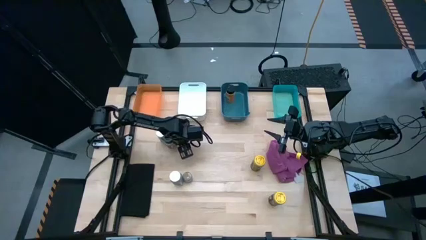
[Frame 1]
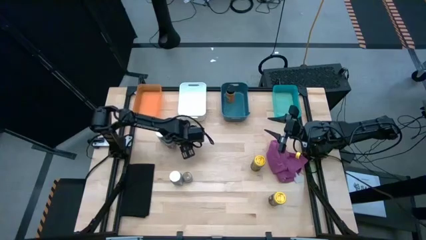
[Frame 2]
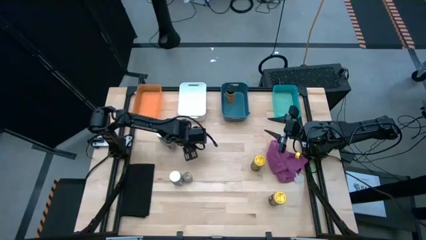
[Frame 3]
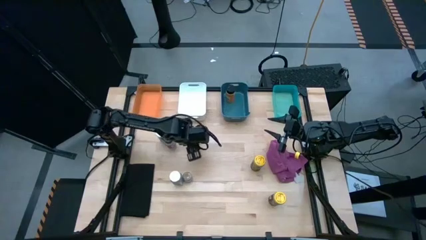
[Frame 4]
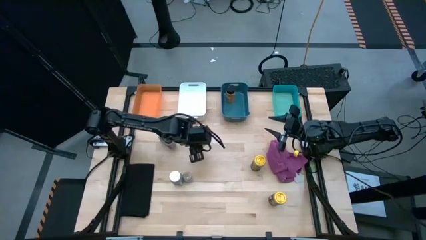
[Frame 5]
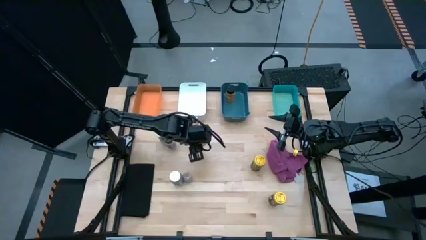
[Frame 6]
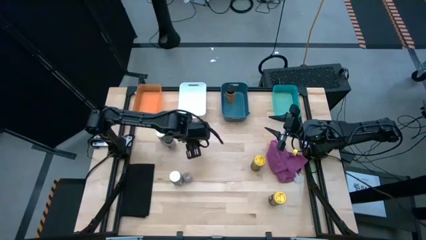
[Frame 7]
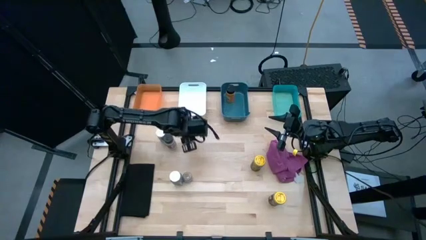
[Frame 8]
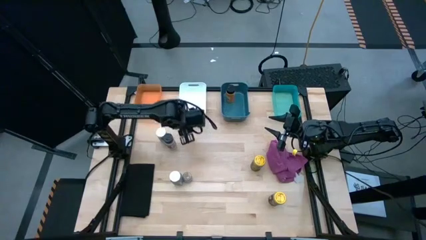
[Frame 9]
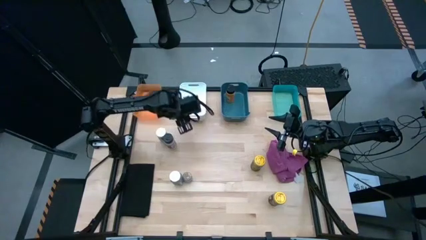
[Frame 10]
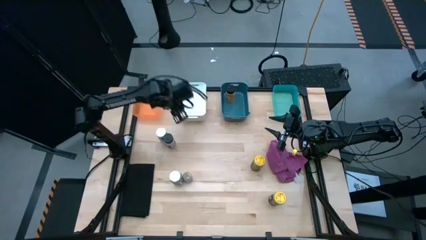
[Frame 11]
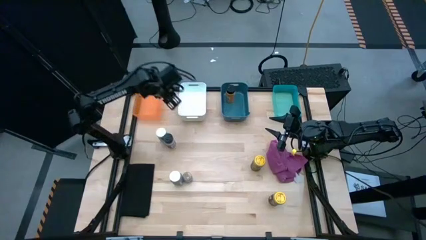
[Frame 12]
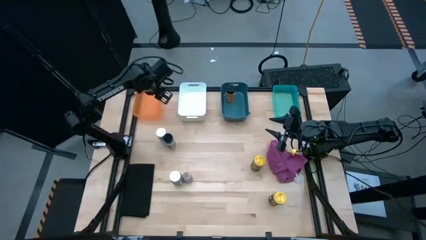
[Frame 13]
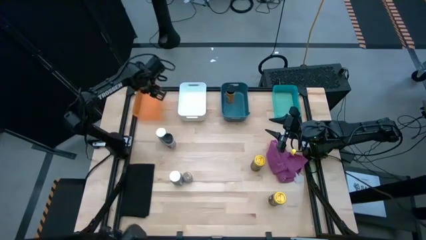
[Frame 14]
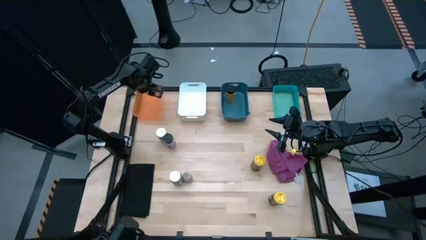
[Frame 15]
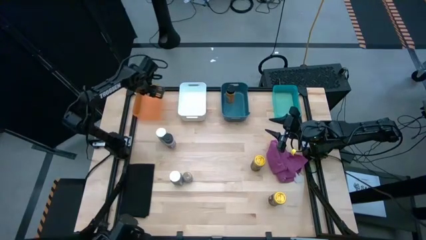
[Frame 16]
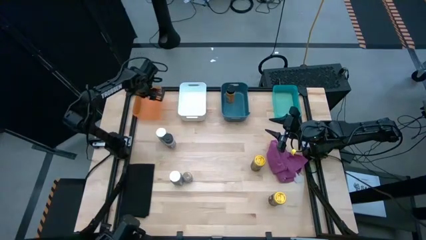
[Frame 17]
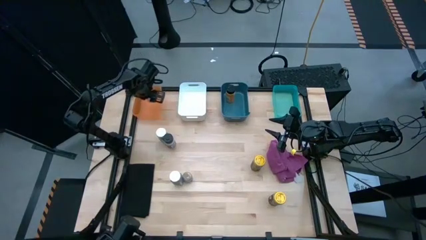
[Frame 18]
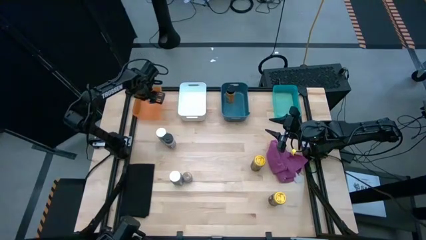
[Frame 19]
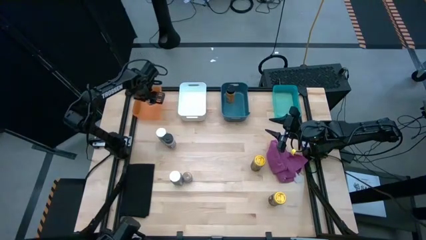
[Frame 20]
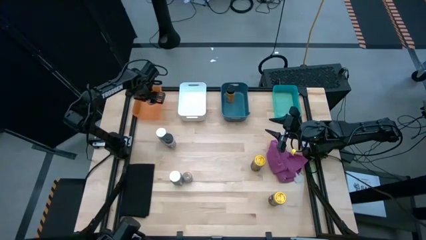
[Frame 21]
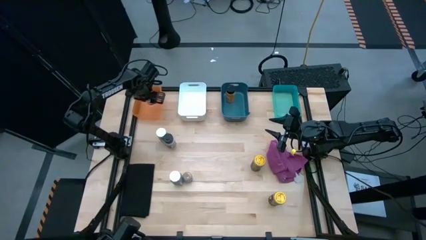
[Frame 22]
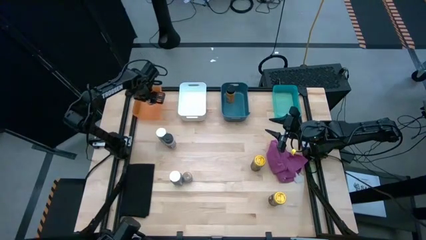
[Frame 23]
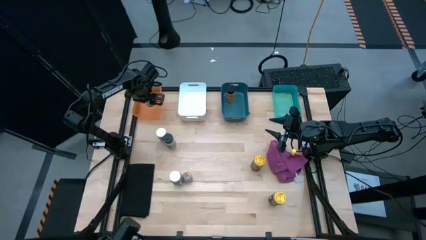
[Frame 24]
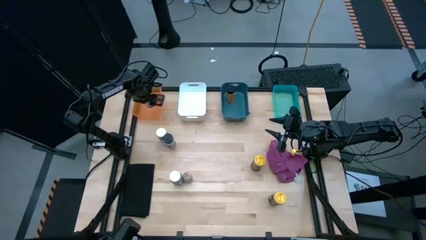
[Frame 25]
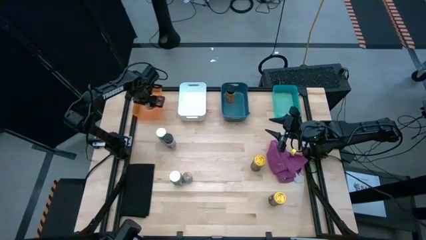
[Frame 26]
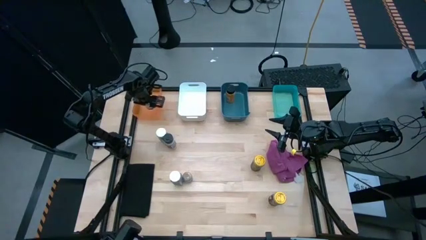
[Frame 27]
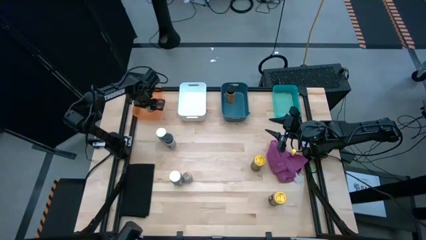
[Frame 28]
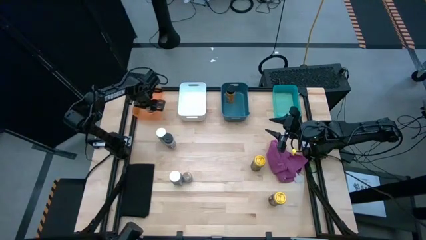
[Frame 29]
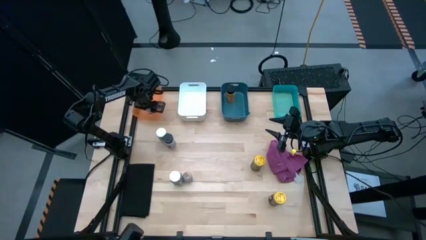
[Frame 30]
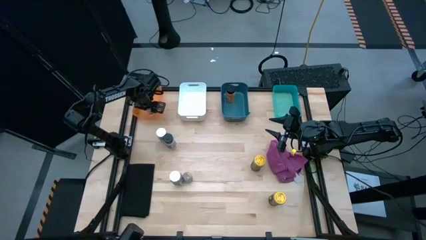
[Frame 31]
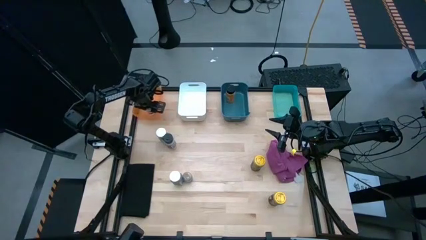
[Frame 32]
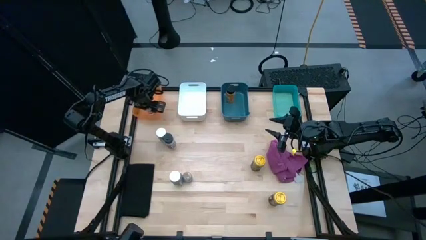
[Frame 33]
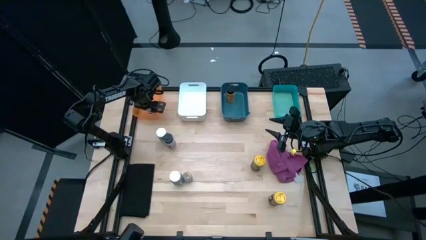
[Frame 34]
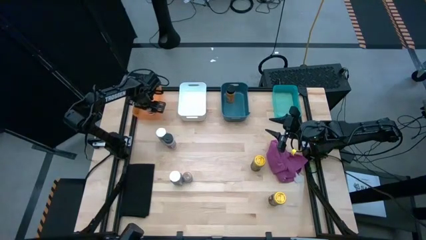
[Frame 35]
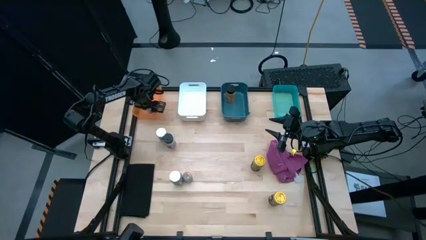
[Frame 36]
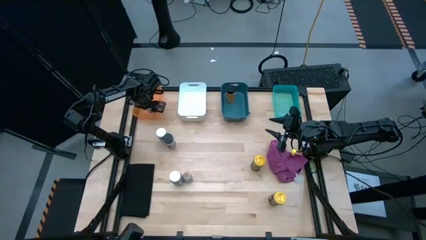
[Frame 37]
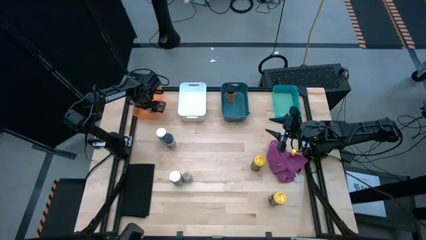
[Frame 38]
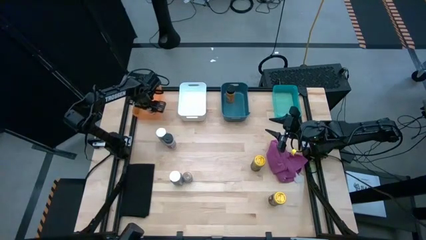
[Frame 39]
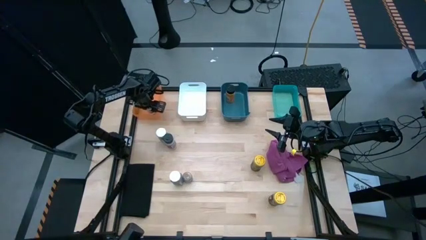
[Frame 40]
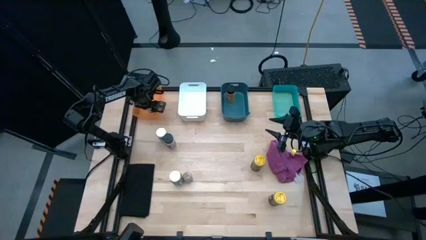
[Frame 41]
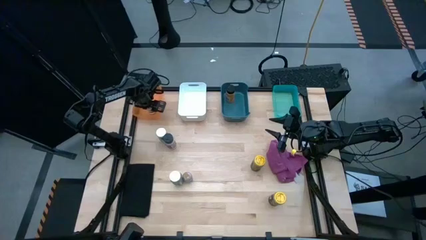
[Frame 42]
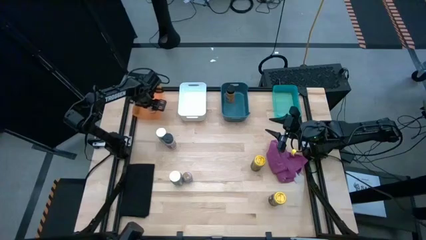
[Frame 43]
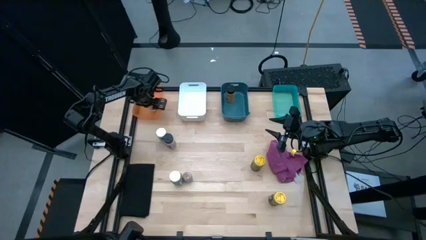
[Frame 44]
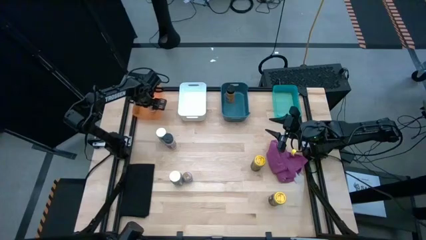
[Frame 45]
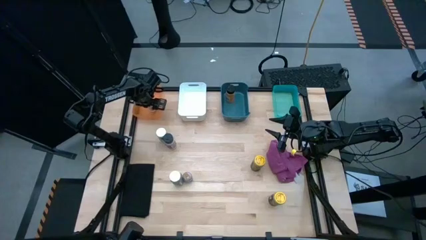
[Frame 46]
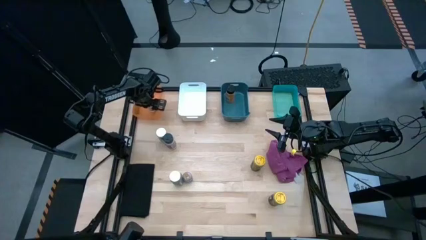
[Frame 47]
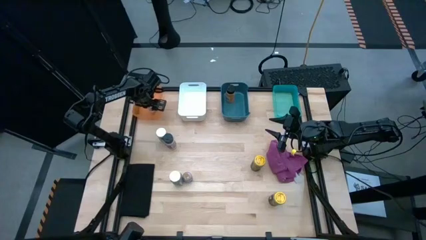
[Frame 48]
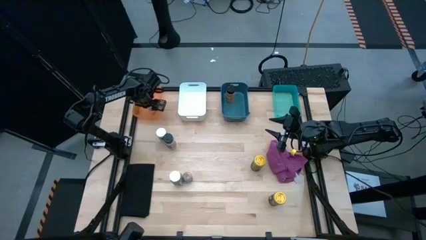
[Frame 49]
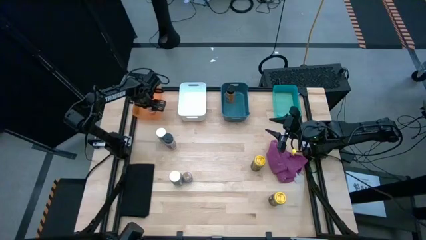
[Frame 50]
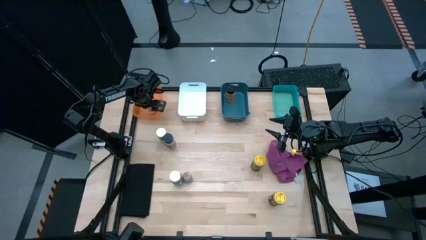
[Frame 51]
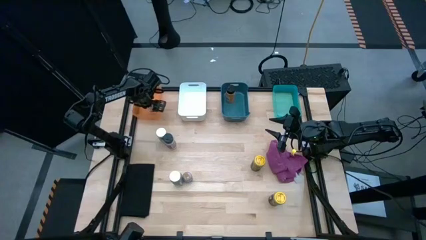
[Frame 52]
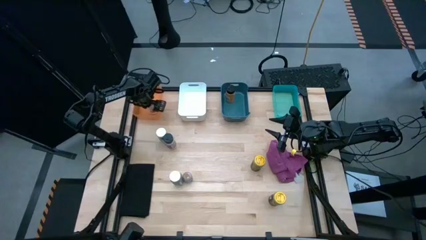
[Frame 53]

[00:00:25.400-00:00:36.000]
Task: Sort spices by type
Put the top brown seasoning bottle into the orange bin

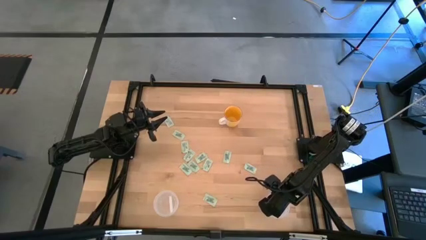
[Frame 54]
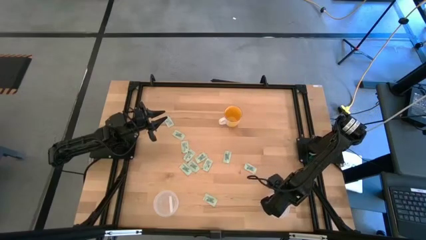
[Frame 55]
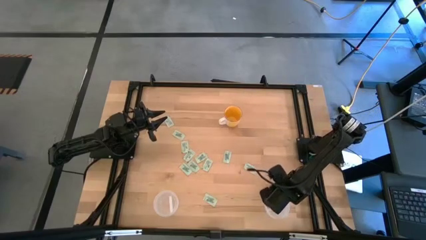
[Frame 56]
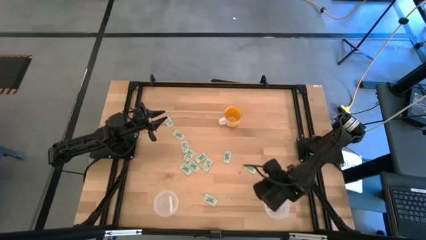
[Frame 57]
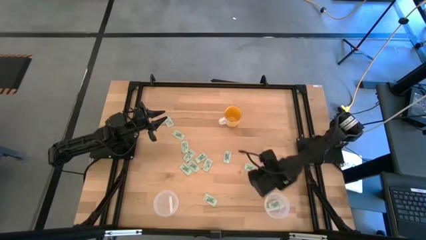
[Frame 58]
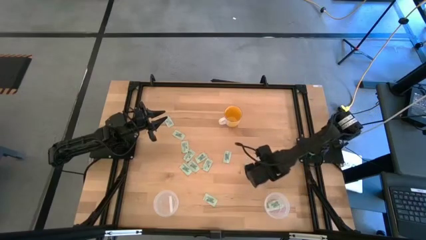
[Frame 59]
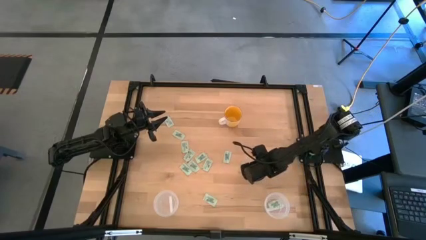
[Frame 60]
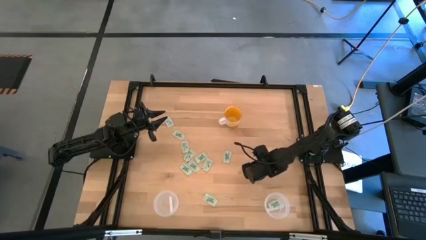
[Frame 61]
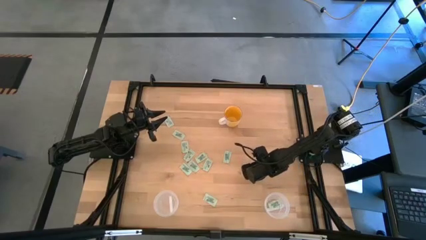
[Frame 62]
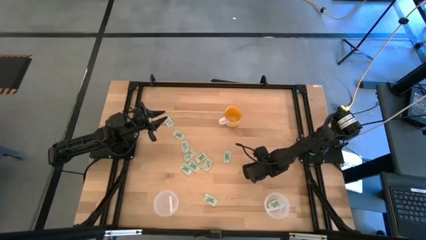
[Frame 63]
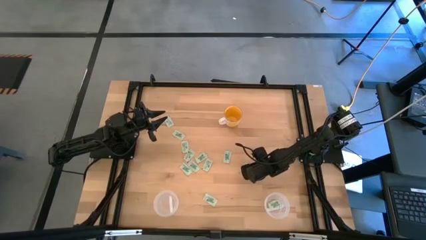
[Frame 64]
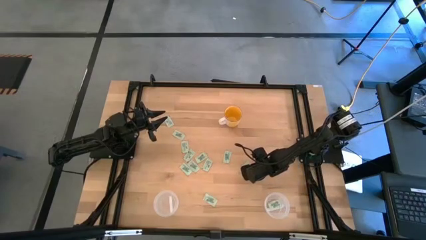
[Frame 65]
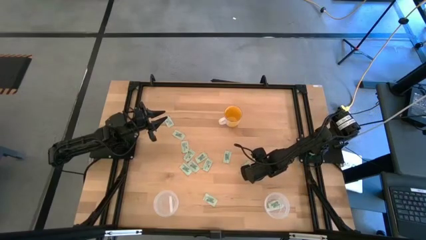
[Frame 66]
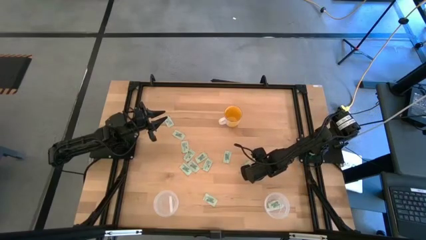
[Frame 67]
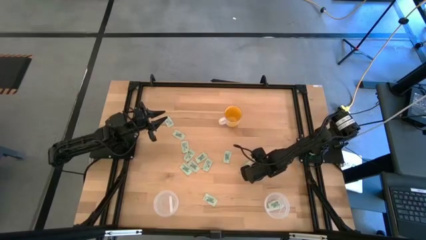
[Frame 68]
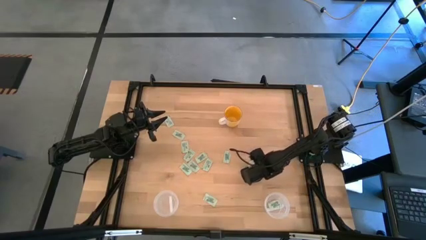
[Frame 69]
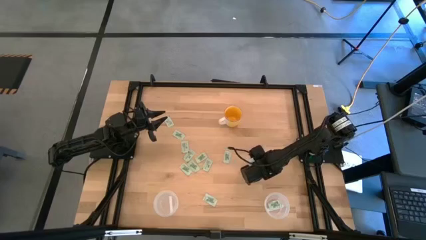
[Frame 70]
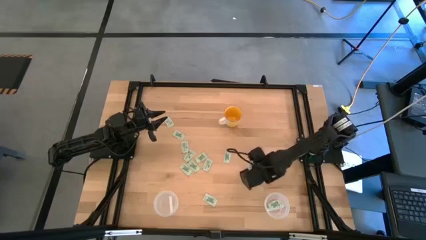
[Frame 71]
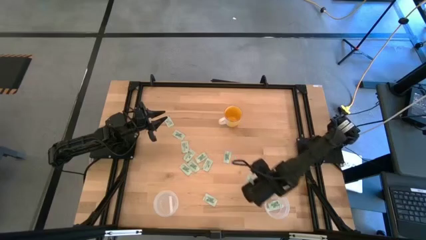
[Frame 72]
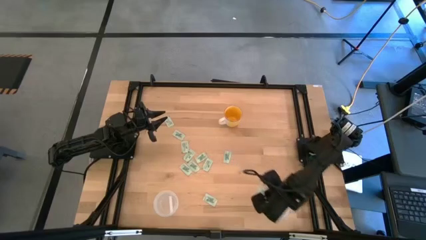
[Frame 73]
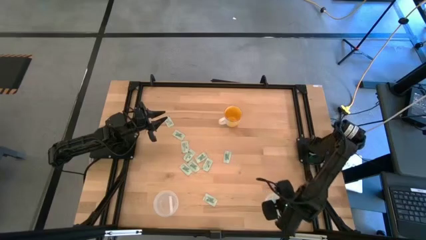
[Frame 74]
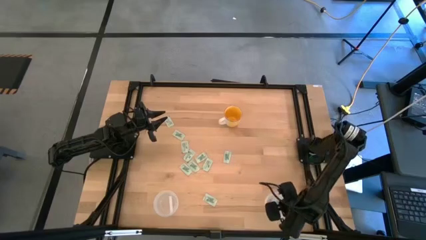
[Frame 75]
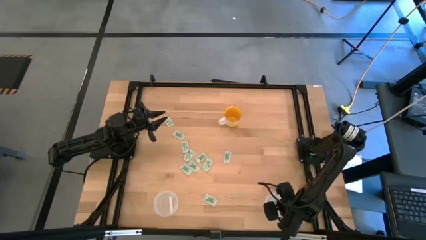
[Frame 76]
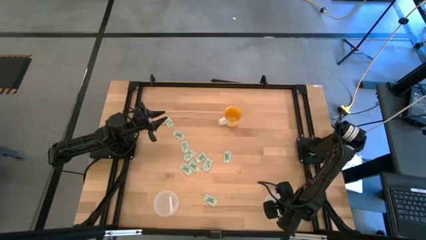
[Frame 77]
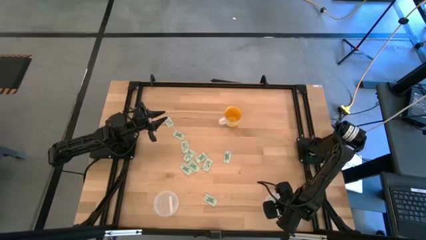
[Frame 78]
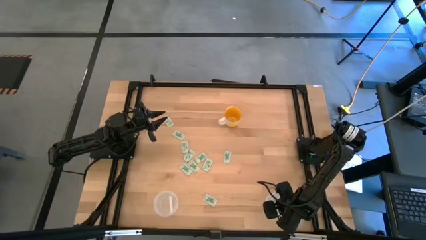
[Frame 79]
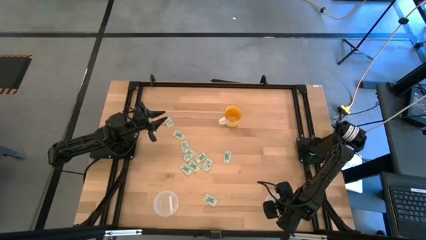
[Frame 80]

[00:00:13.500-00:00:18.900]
Task: Pick and place items into bin
Put the stevia packet into the right transparent bin
